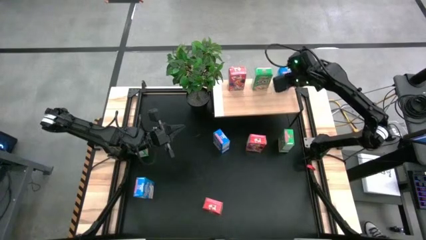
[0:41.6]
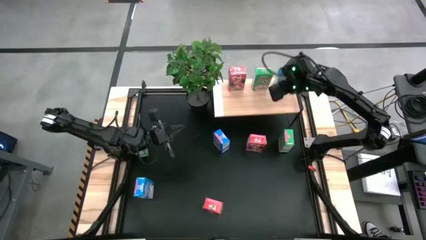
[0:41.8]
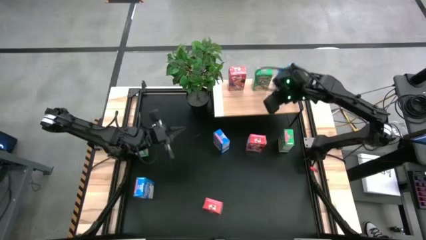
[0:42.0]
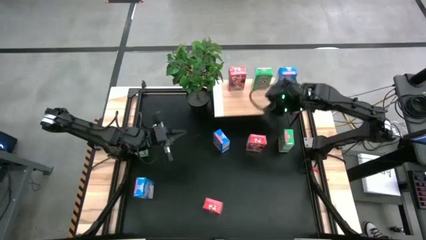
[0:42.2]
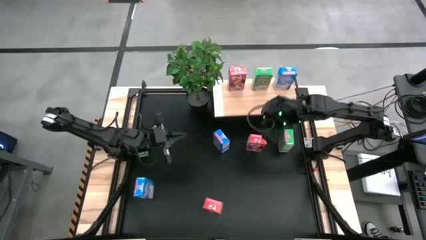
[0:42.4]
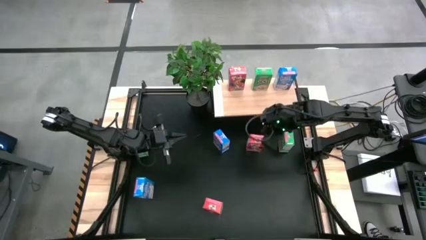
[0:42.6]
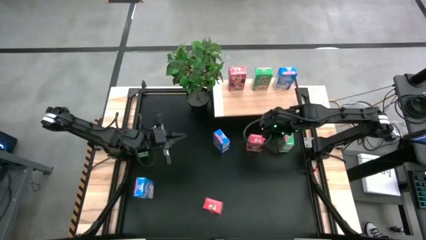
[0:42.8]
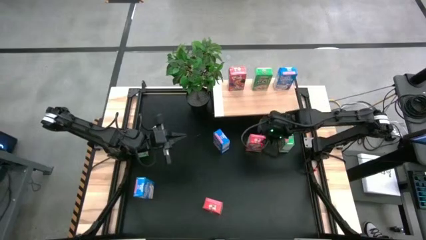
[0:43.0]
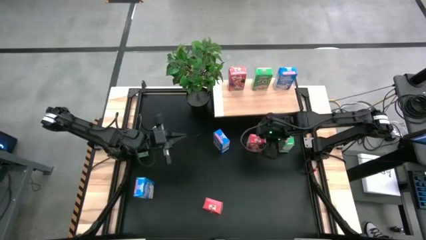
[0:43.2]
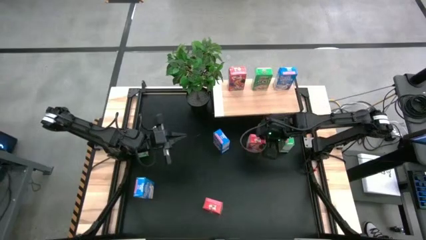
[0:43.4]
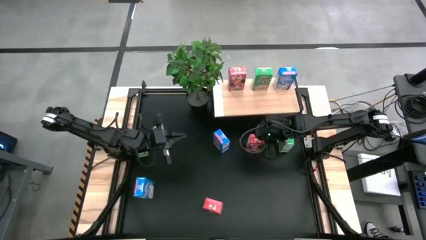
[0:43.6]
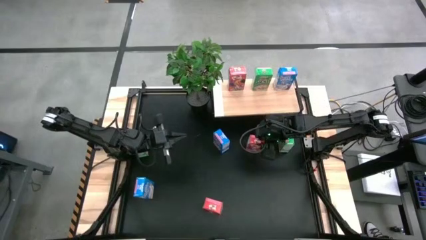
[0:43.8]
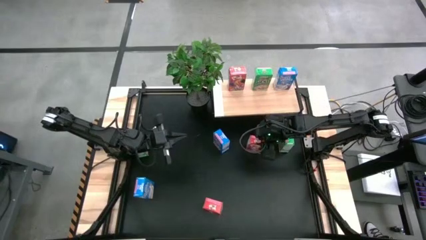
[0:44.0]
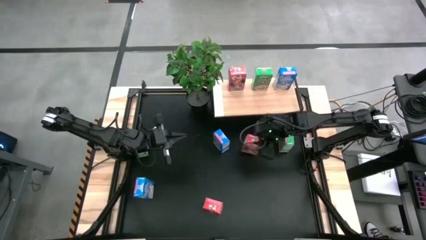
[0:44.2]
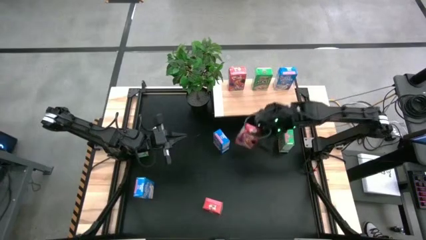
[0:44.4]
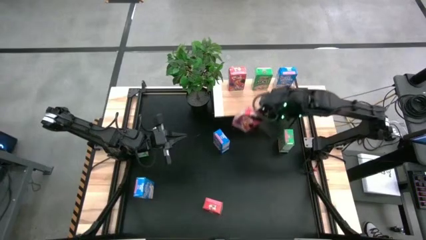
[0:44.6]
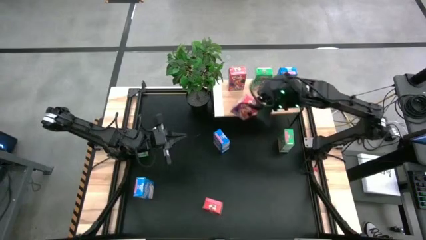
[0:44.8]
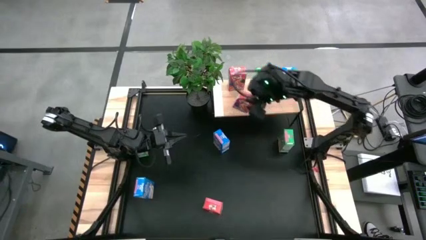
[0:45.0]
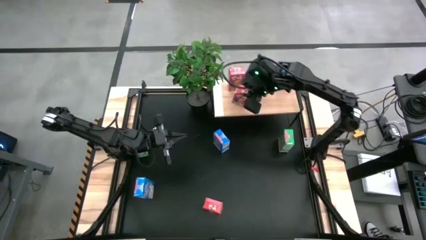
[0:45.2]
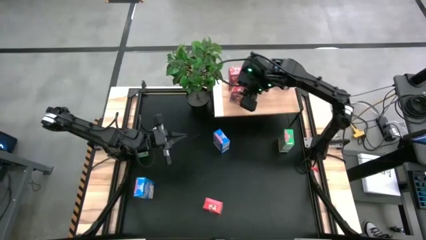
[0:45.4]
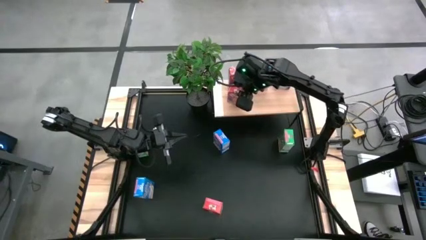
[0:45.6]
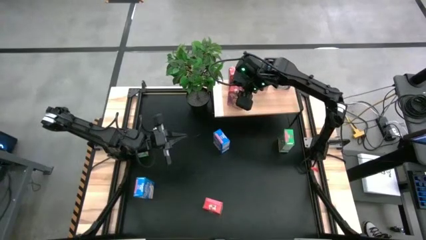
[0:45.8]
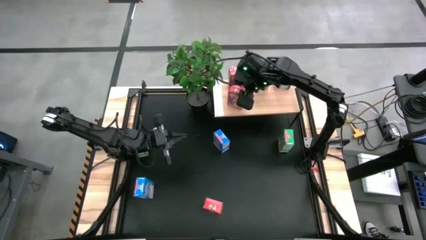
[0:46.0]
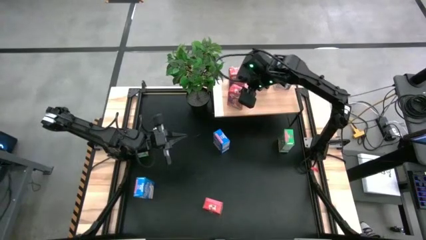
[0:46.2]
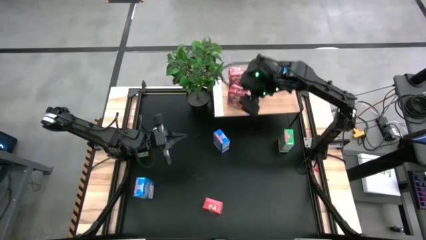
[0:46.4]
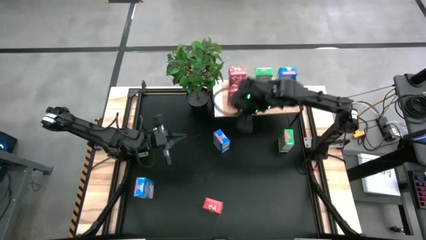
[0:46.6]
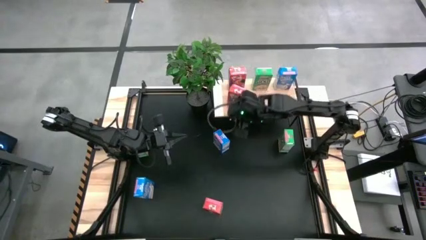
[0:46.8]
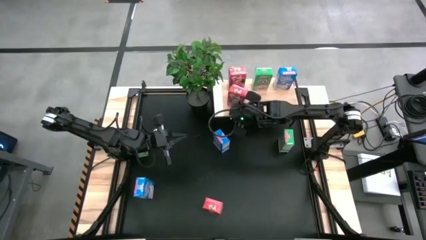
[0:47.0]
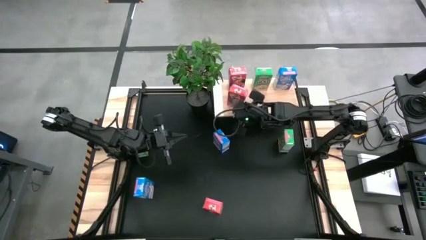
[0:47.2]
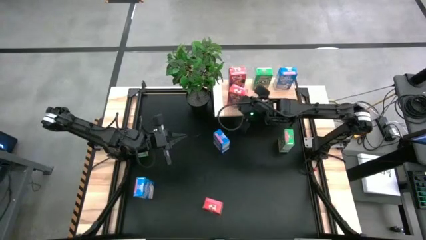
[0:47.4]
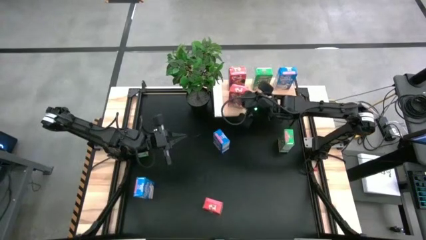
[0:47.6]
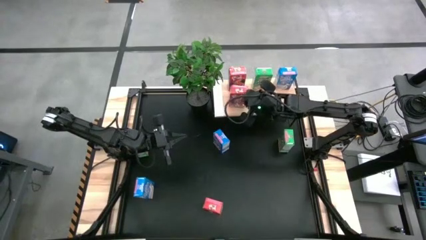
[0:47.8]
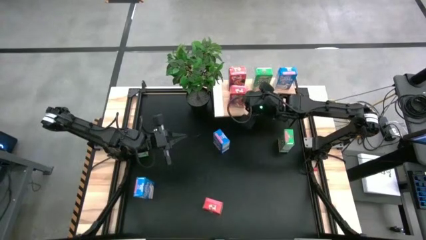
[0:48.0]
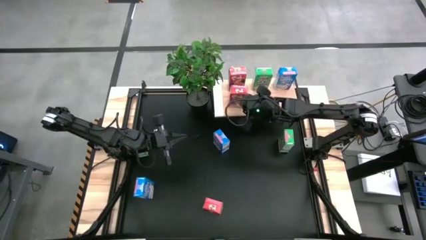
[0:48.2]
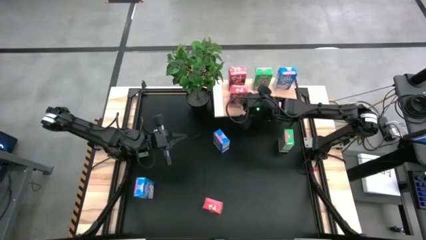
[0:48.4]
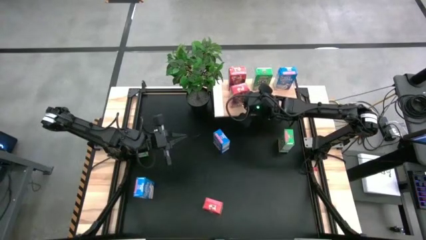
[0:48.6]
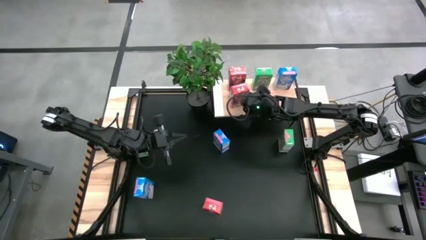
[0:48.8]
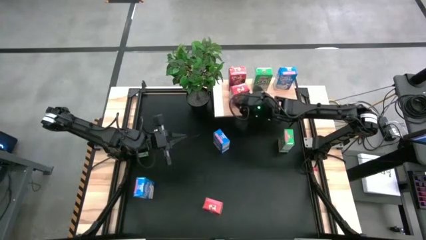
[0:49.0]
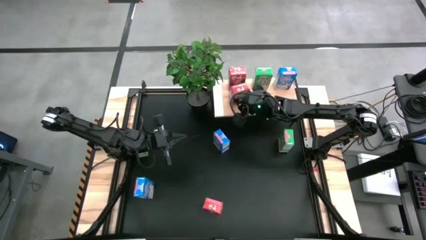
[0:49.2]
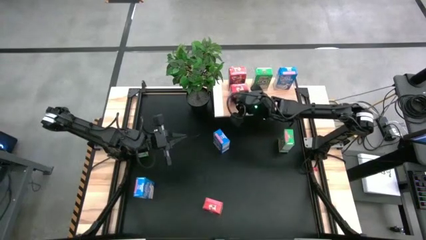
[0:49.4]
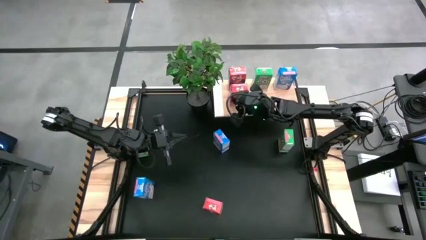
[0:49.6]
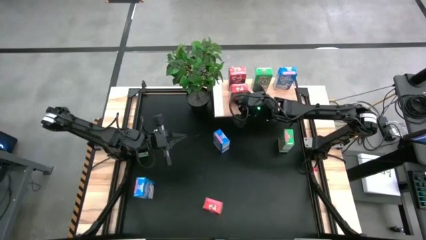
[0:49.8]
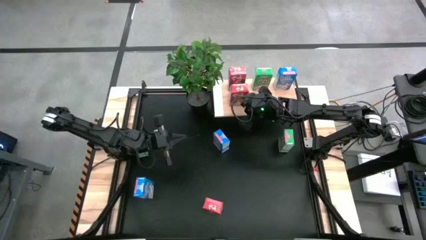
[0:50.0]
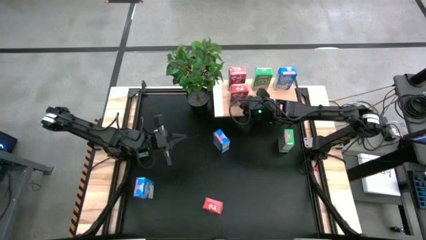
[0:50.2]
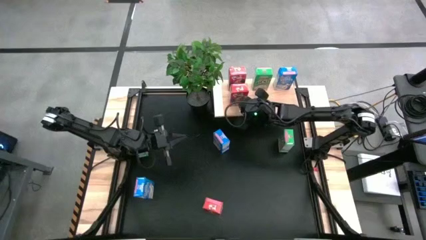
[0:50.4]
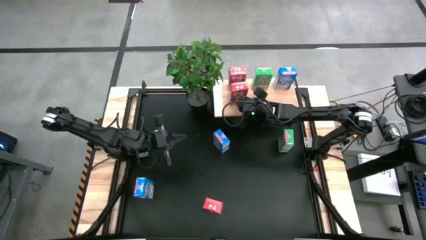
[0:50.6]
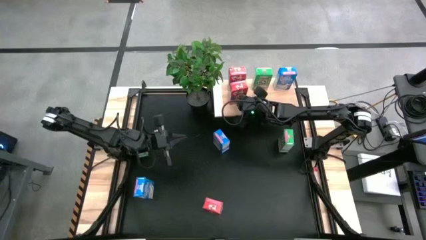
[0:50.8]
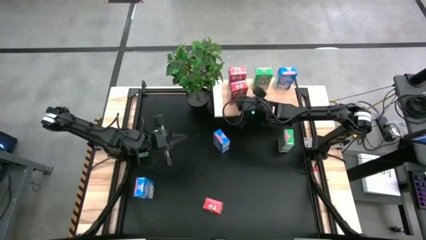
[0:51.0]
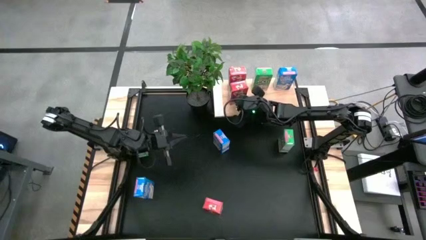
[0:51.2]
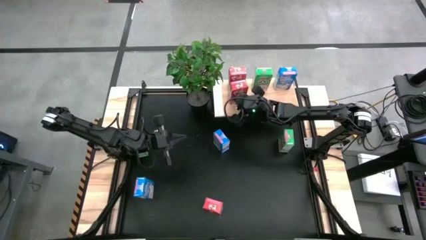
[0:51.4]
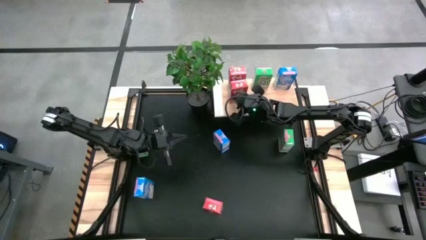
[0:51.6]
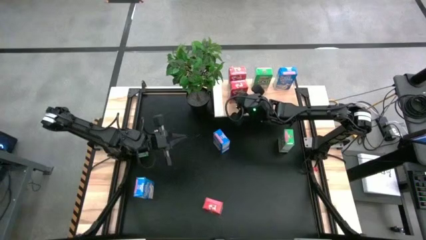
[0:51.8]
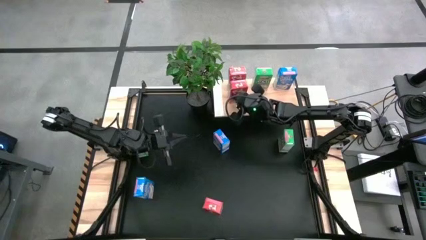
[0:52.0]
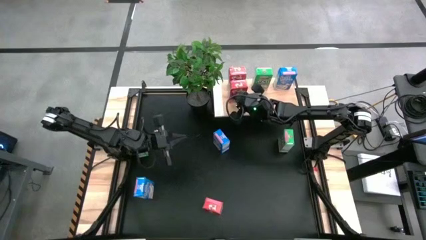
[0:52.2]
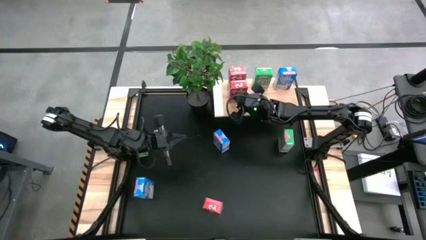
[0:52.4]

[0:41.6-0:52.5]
Task: Stack cereal on shelf
Put the top red cereal box on the shelf
